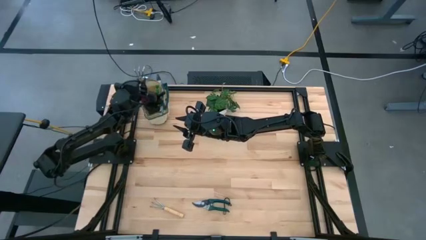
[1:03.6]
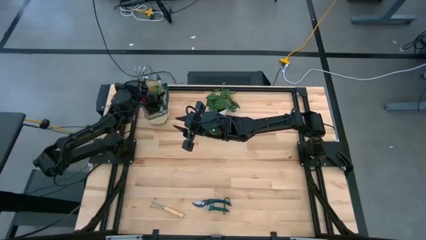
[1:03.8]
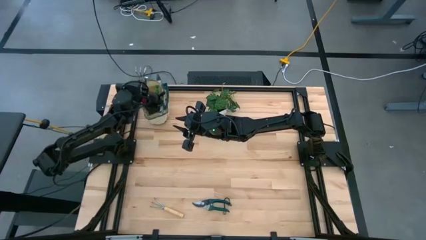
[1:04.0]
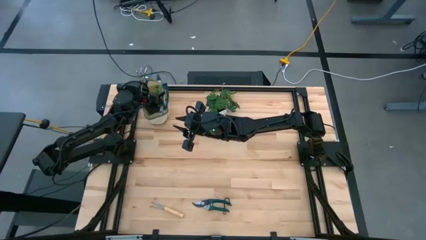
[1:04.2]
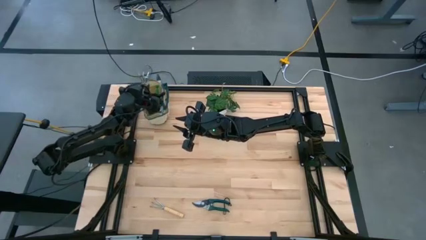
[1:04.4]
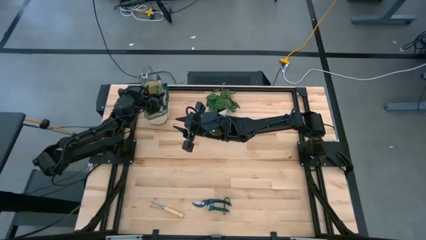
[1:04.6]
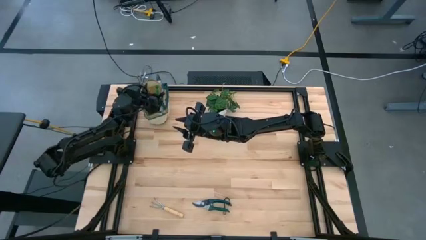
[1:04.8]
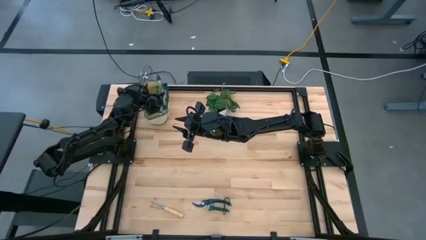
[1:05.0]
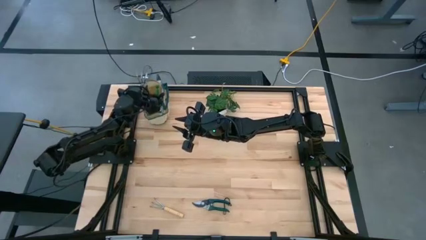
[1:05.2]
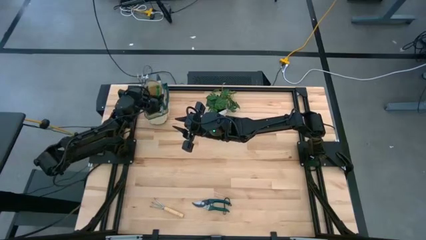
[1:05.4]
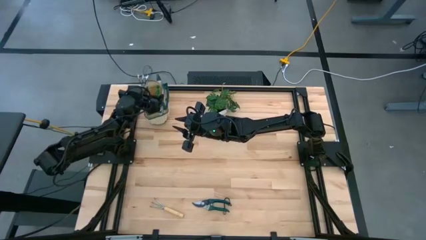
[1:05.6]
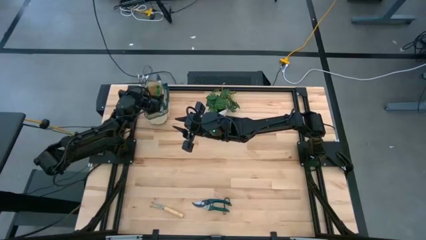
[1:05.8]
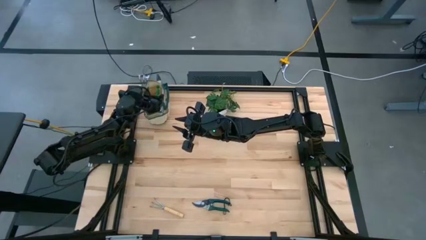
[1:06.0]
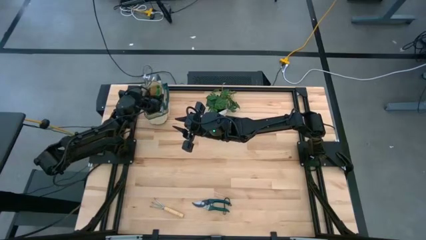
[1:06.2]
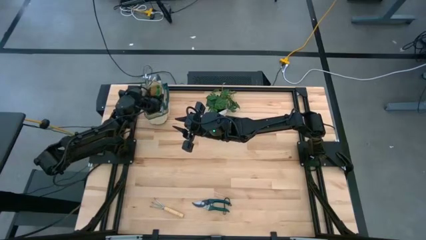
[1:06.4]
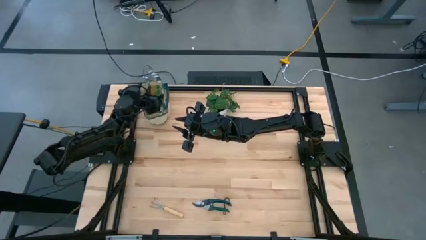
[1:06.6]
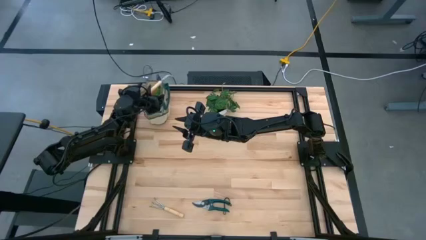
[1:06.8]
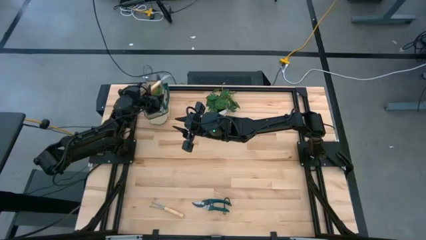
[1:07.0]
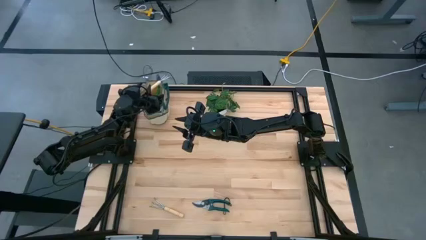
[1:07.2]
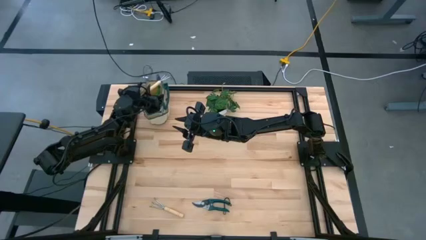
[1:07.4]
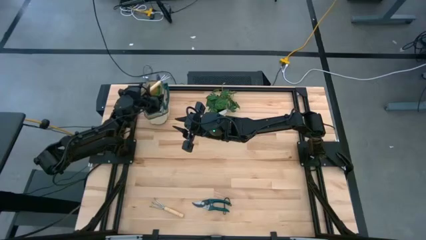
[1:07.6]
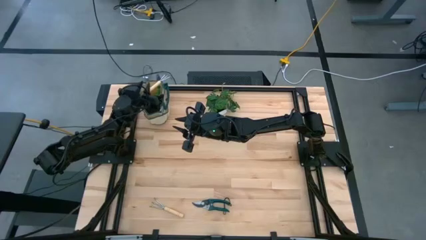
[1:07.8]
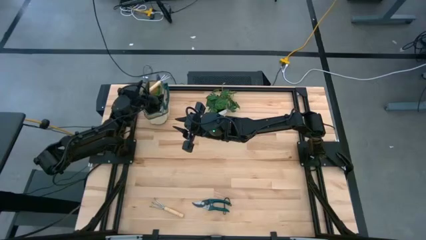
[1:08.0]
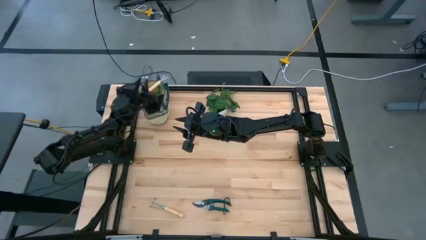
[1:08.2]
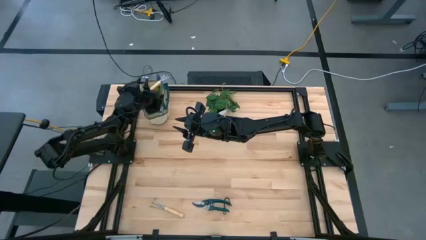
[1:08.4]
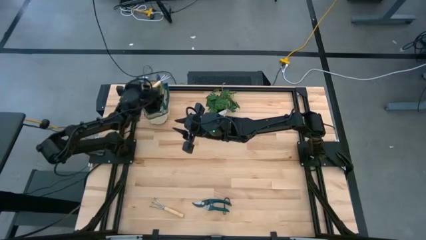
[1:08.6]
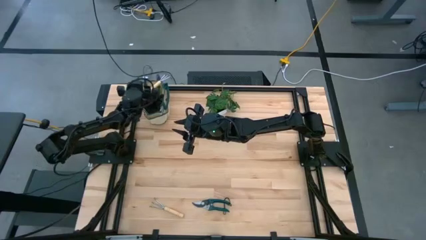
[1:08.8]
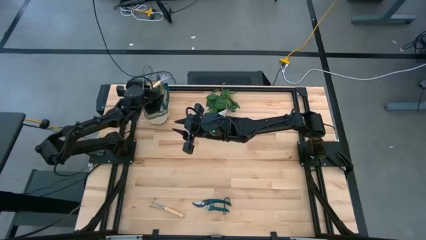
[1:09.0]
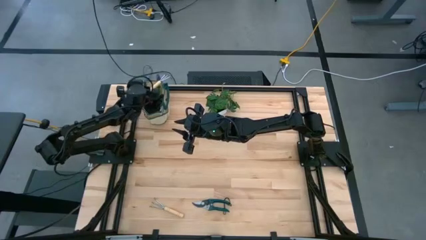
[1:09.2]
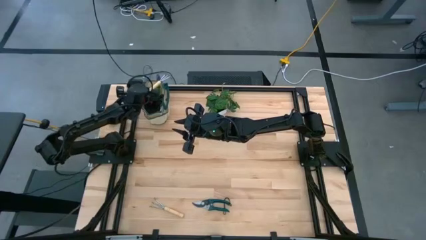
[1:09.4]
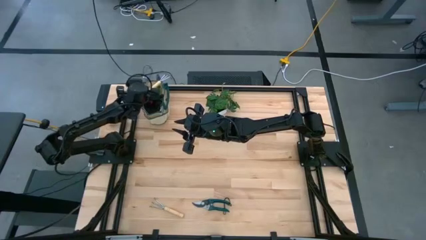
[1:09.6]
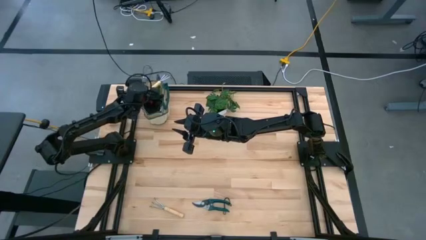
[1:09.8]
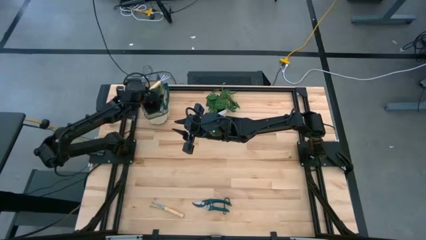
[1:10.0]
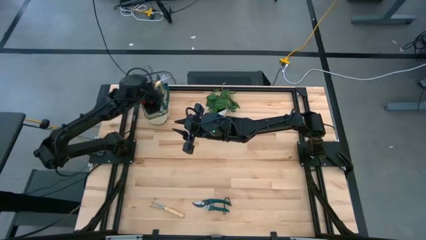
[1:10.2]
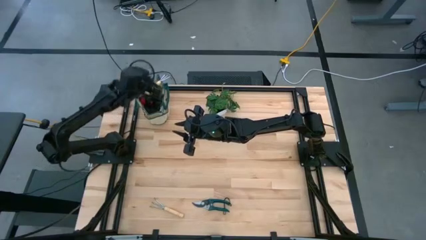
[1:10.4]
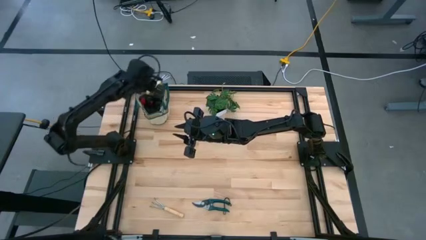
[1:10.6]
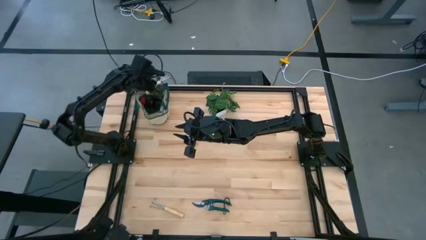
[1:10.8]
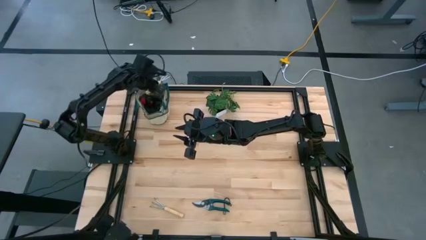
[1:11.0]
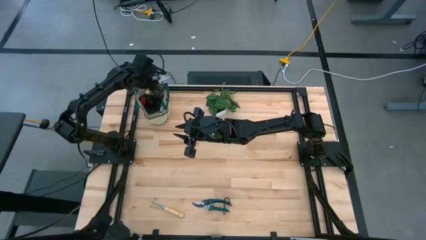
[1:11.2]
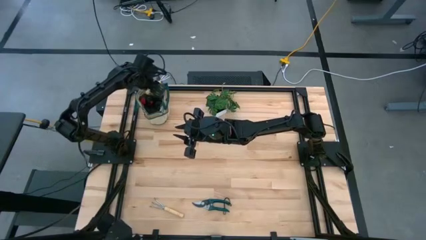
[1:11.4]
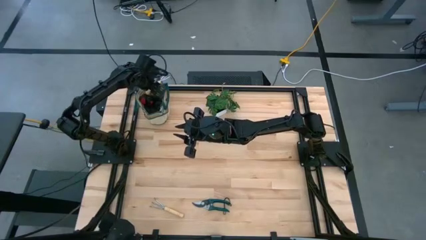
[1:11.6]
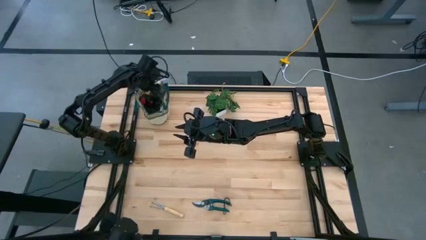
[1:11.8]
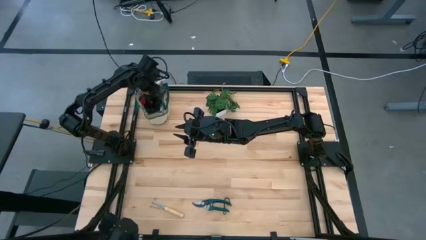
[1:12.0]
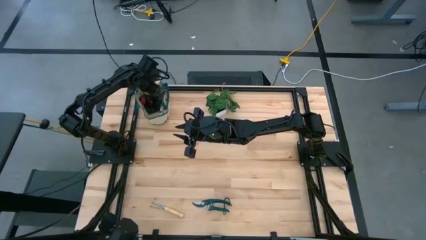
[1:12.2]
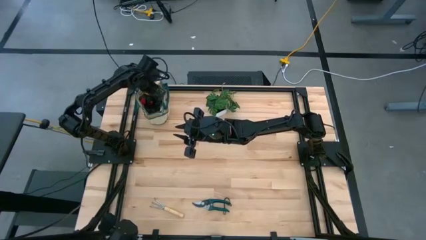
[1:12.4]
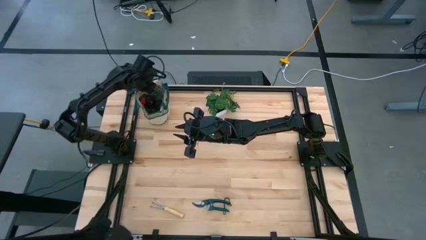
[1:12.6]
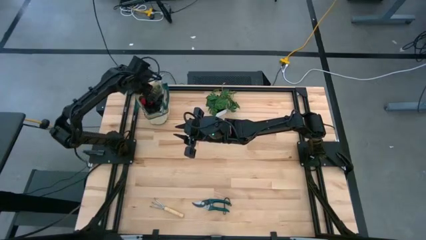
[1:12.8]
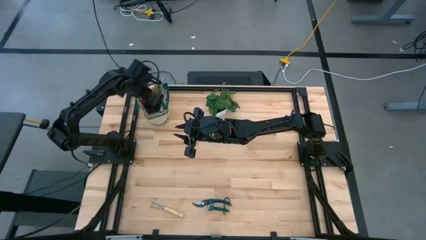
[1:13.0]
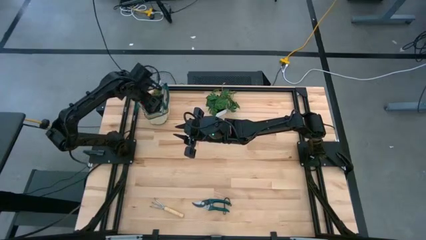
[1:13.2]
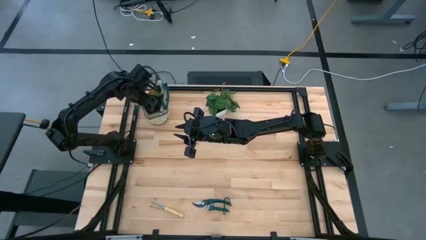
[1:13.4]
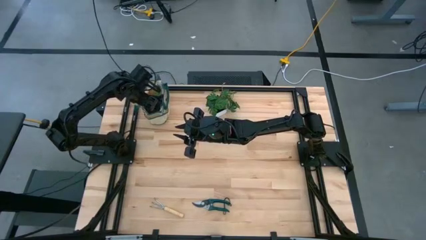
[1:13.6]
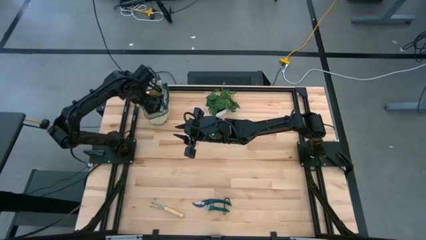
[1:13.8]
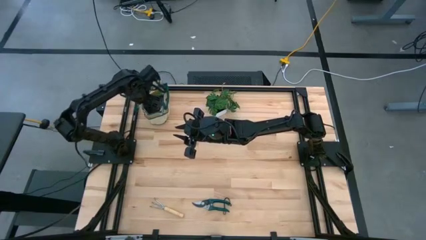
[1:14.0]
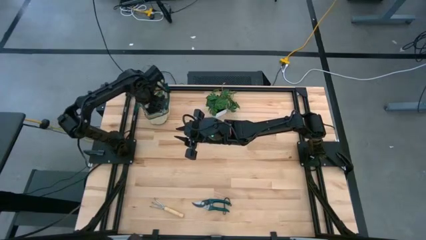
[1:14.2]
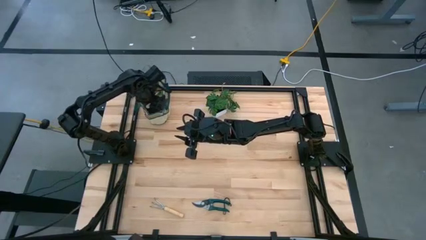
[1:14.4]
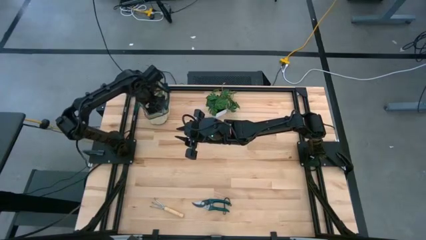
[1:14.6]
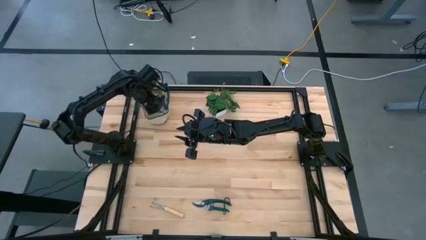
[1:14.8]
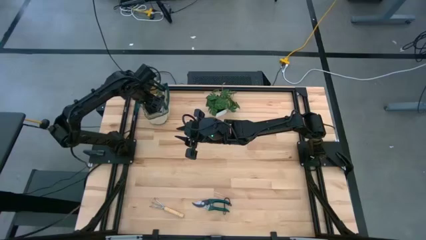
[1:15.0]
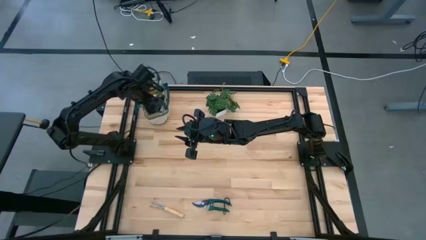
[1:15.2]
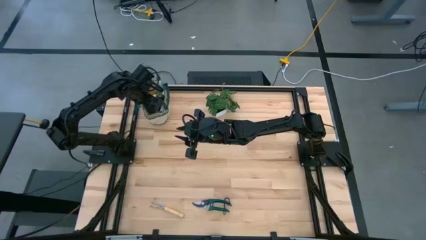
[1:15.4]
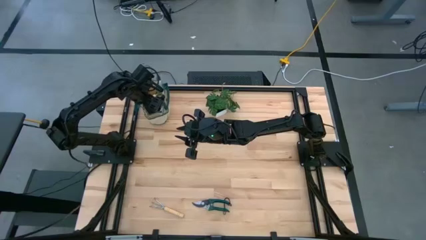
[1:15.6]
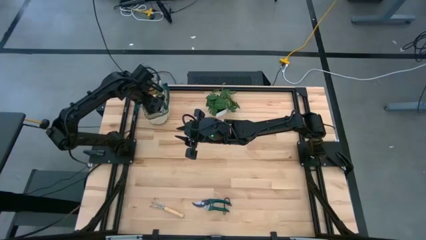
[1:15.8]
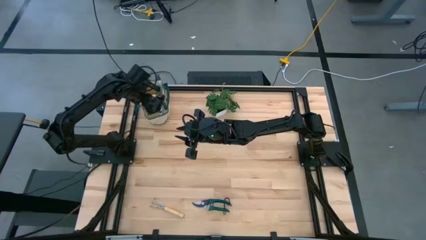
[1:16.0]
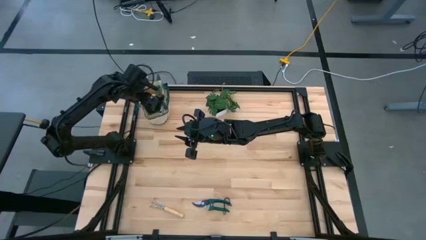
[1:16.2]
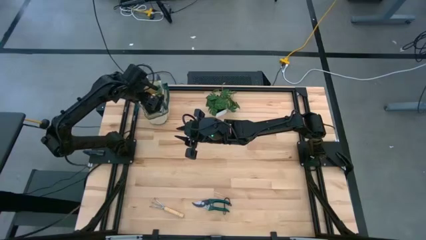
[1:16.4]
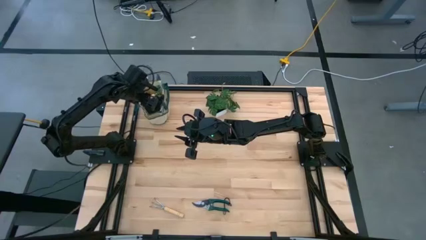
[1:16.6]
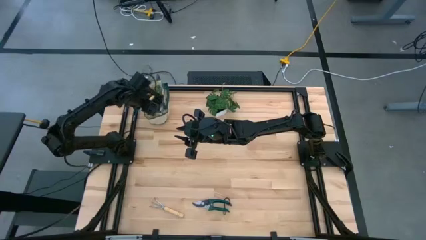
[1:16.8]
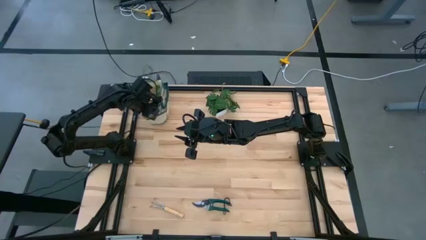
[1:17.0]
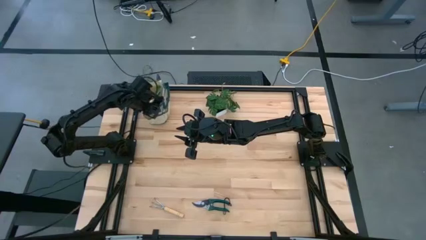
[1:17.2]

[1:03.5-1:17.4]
Task: Pick & Place Garden tools in Gardening bag
Put the right light brown hand rake into the green gardening bag

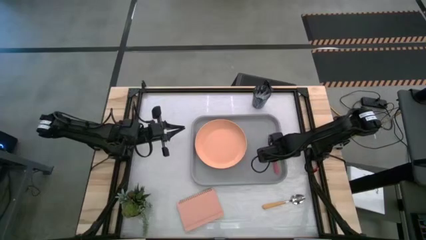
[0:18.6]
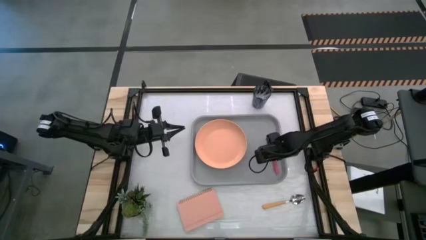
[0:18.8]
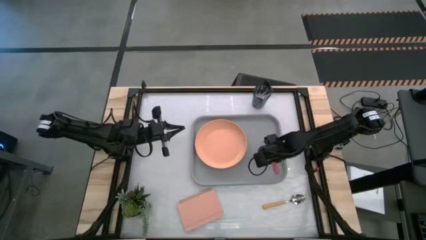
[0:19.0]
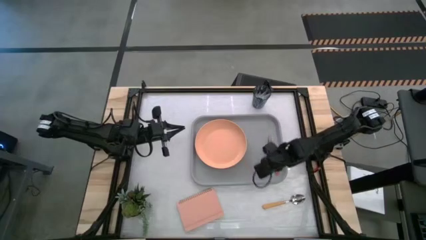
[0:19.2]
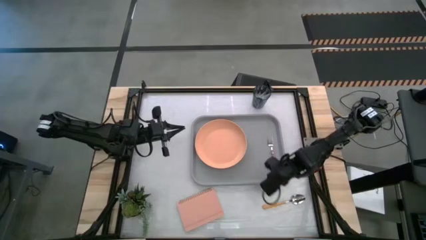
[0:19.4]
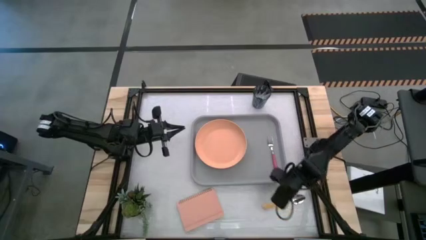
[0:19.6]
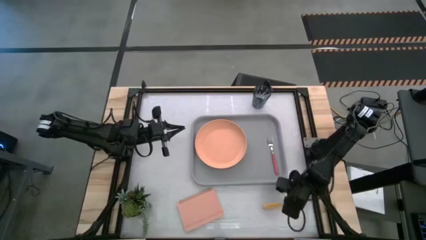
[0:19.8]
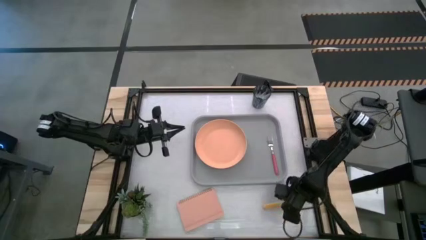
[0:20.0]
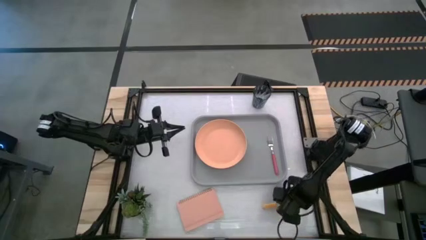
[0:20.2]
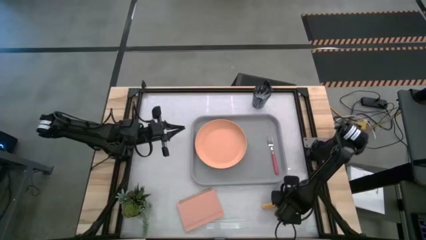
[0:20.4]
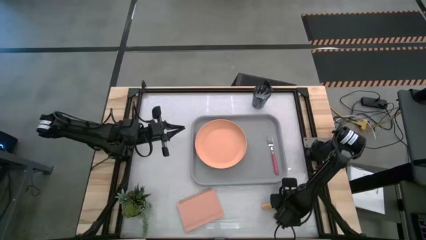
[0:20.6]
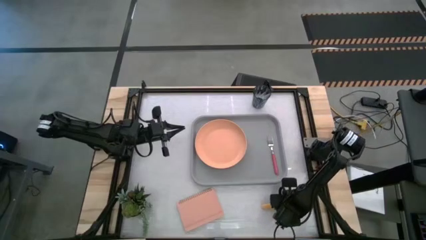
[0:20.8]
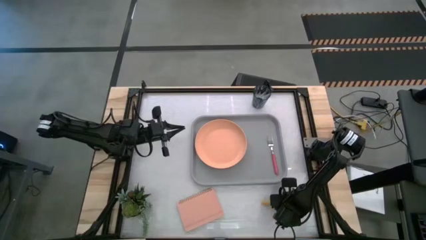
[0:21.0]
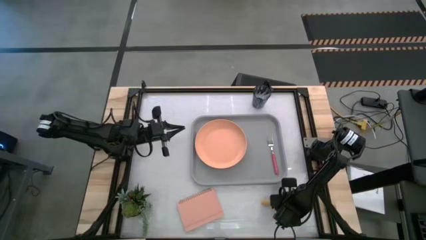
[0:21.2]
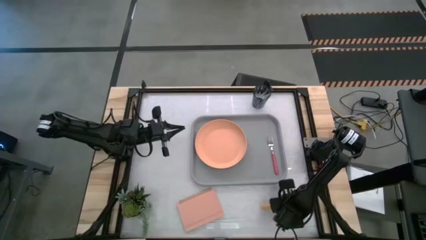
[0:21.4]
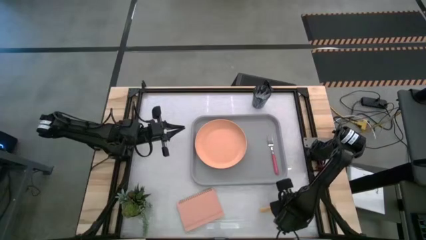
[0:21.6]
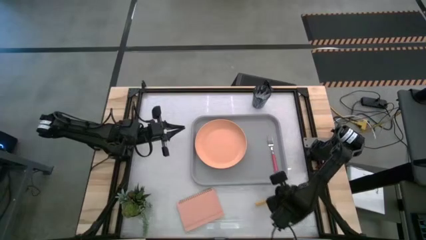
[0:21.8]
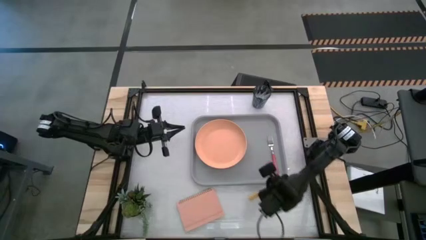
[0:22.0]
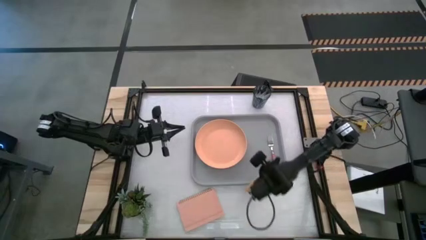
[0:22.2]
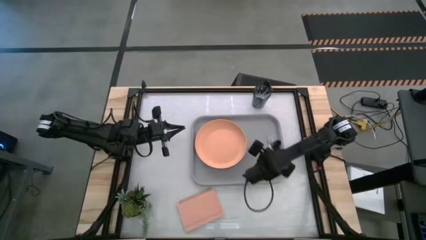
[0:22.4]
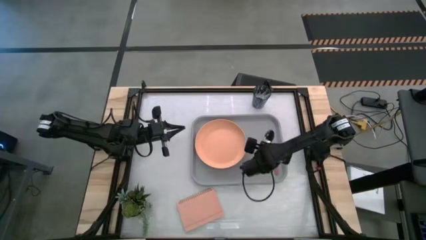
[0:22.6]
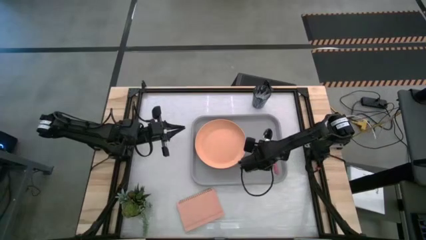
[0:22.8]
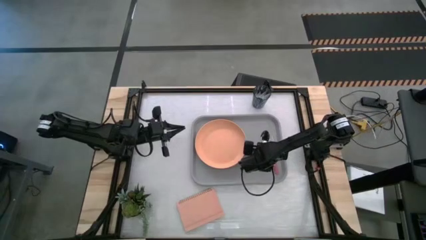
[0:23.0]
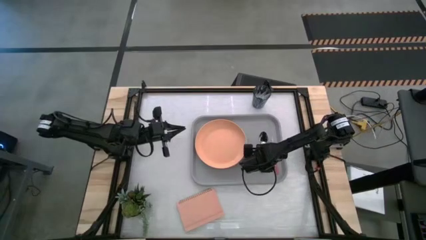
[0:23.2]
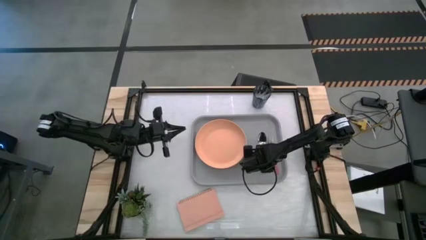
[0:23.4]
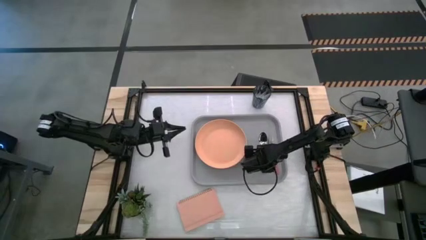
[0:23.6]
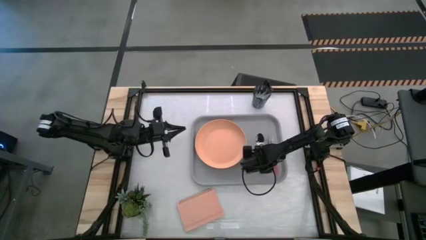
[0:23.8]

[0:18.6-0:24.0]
Task: Pick and place plate/cup/fork/spoon on tray
Put the yellow spoon to the left side of the pink fork on the gray serving tray
